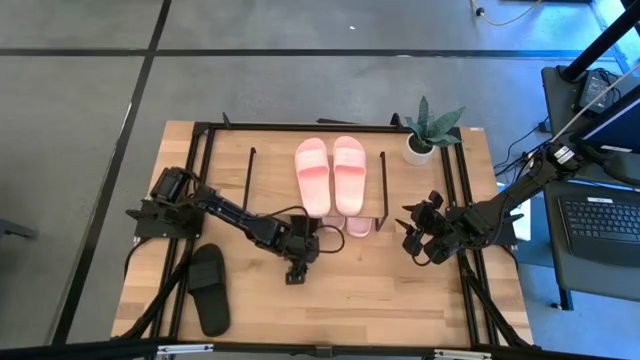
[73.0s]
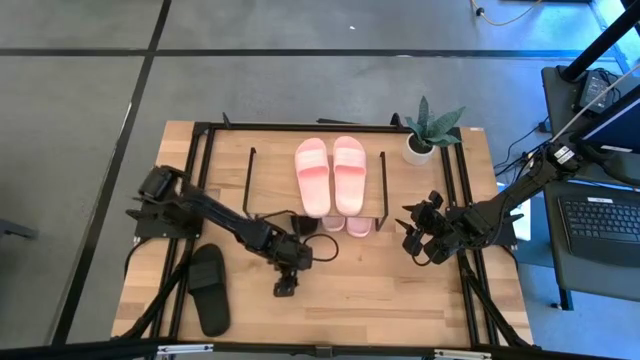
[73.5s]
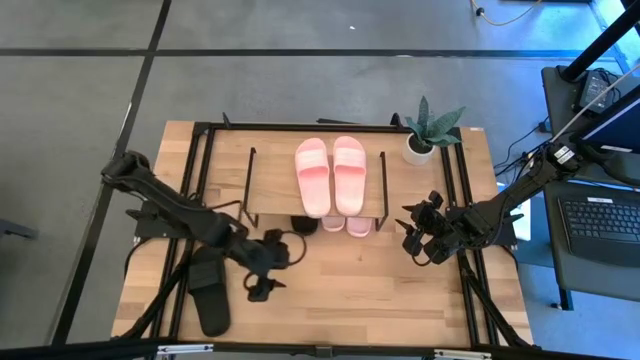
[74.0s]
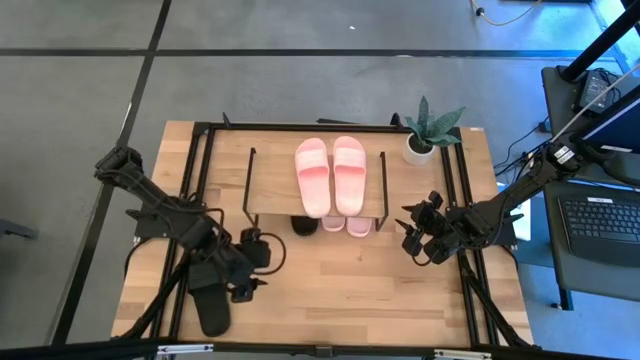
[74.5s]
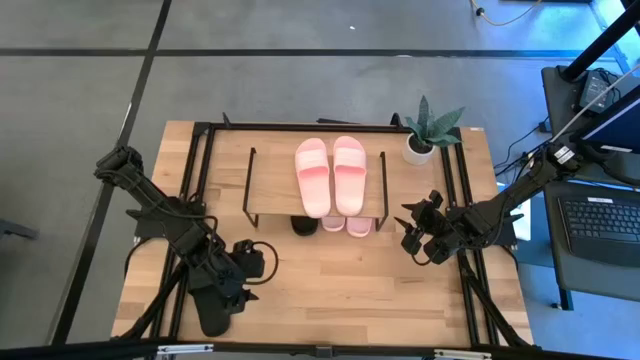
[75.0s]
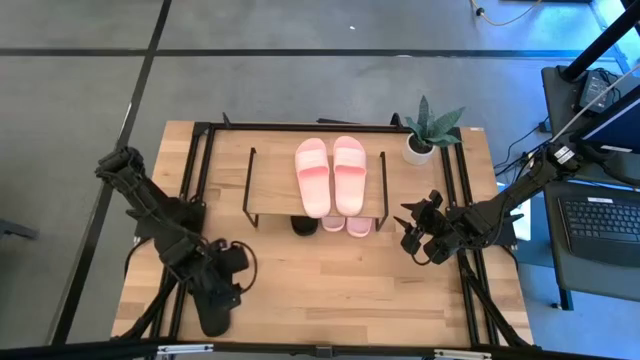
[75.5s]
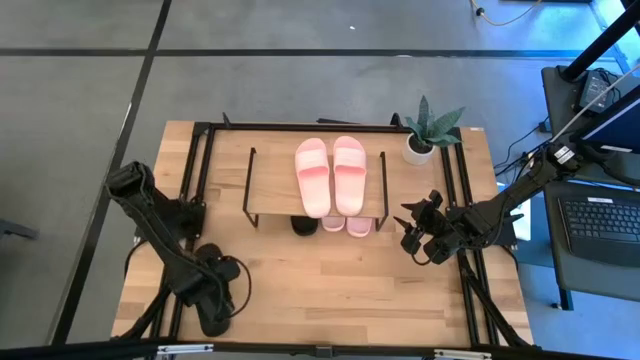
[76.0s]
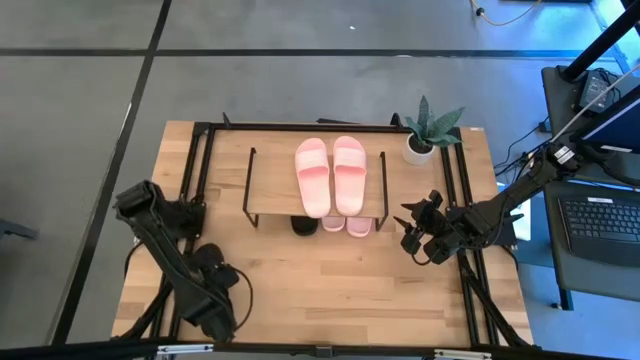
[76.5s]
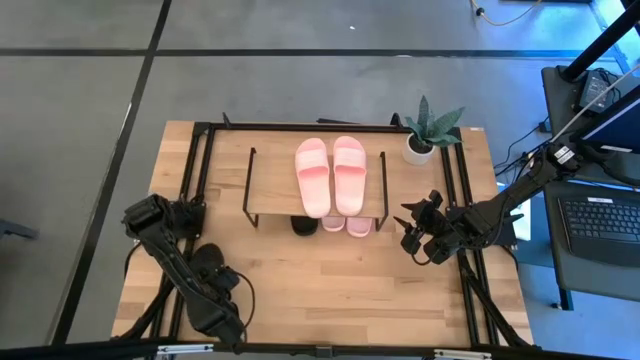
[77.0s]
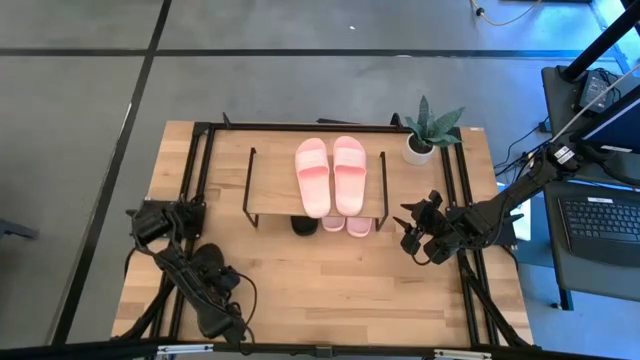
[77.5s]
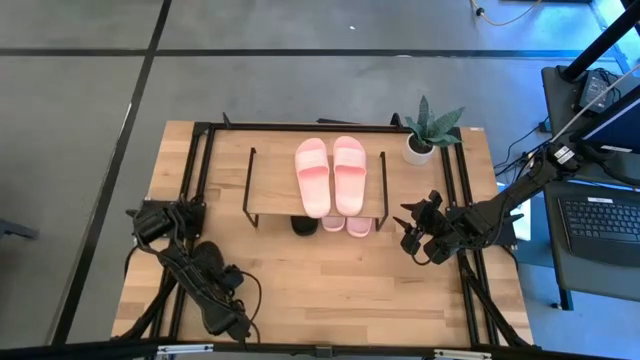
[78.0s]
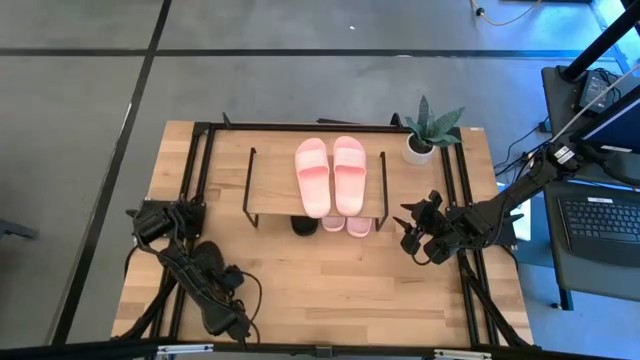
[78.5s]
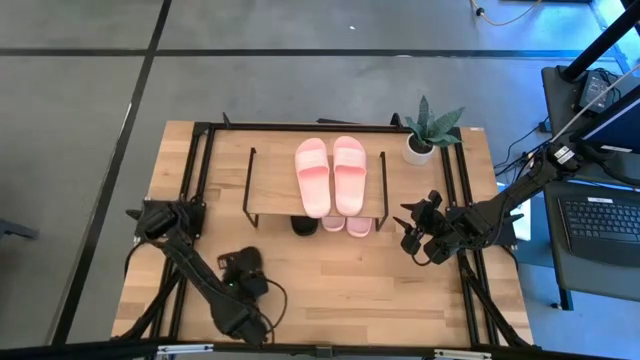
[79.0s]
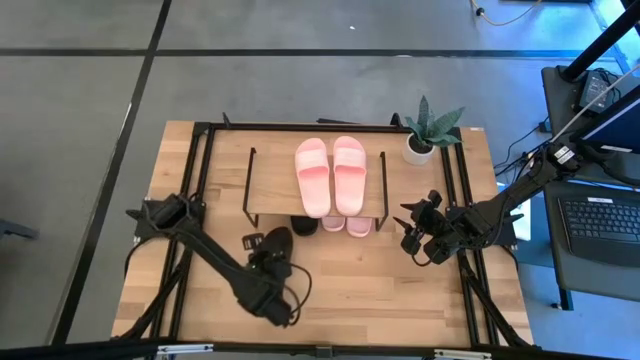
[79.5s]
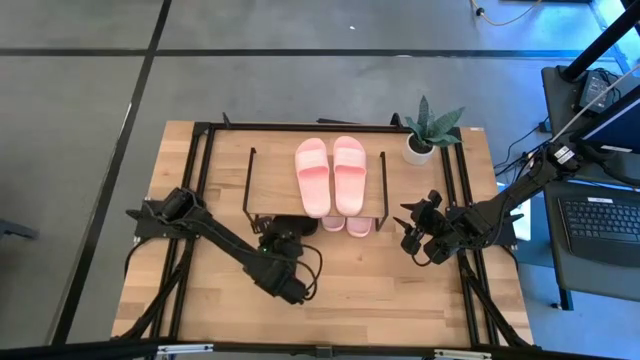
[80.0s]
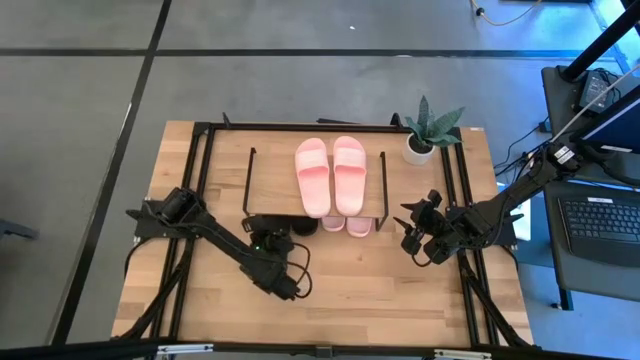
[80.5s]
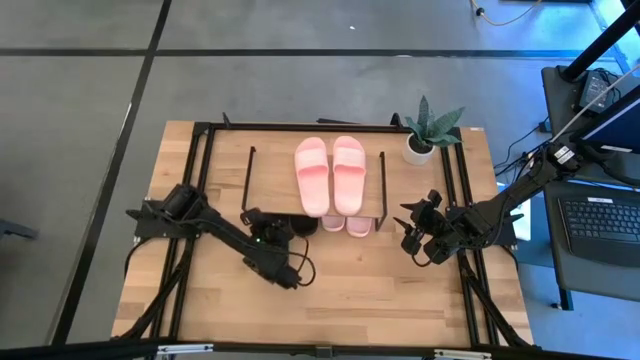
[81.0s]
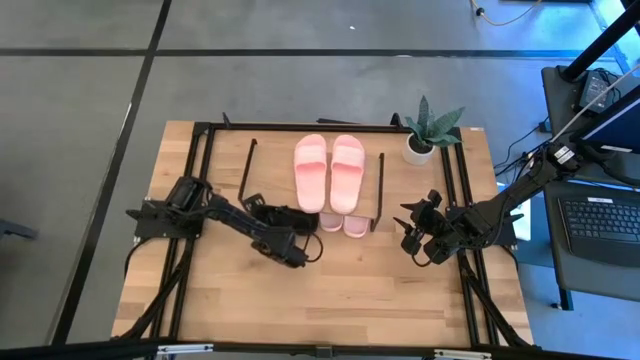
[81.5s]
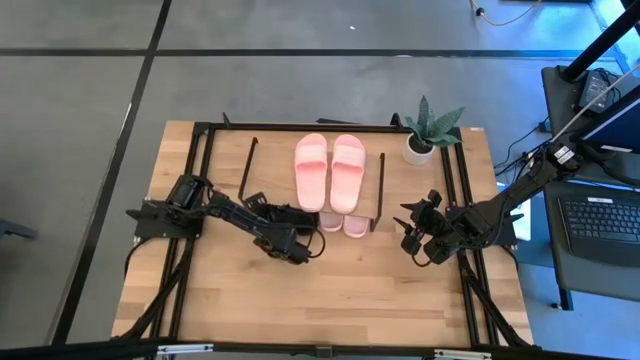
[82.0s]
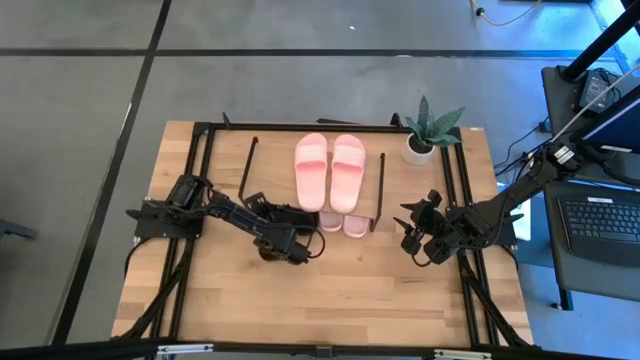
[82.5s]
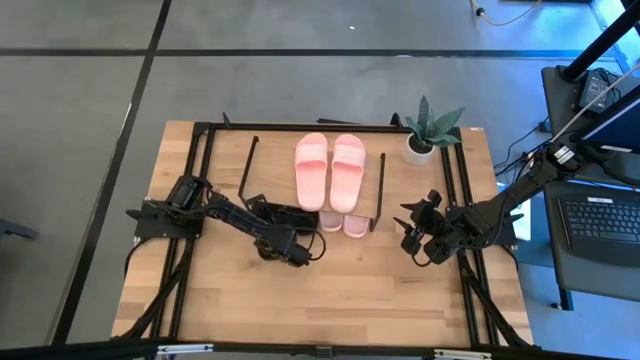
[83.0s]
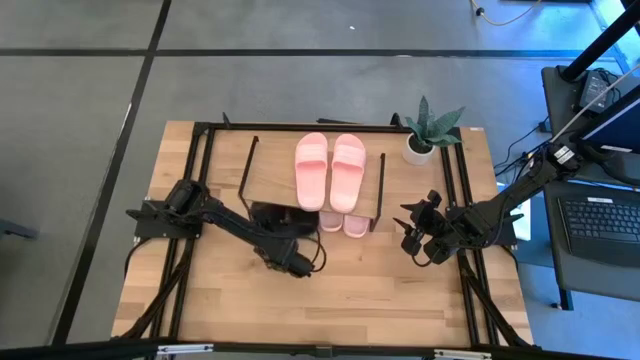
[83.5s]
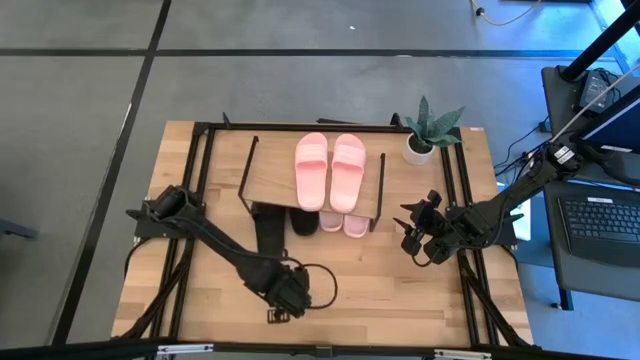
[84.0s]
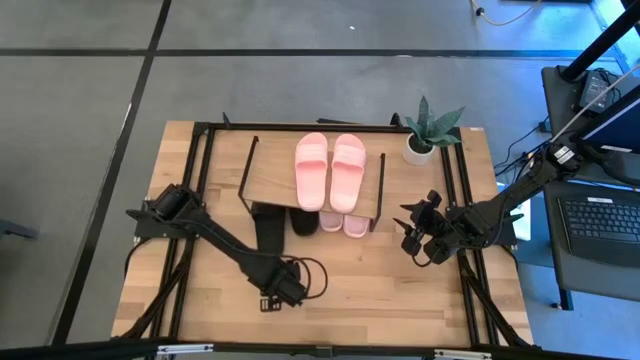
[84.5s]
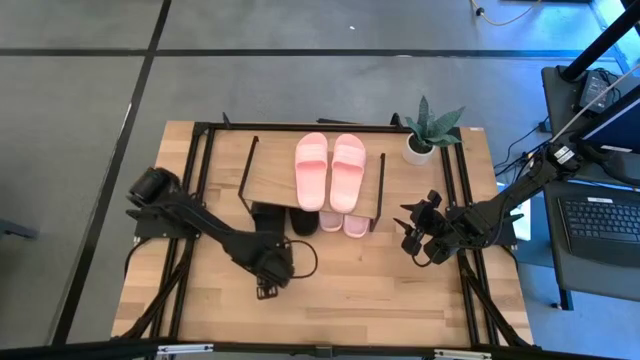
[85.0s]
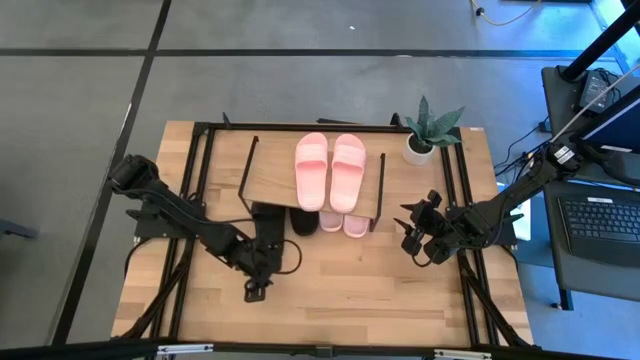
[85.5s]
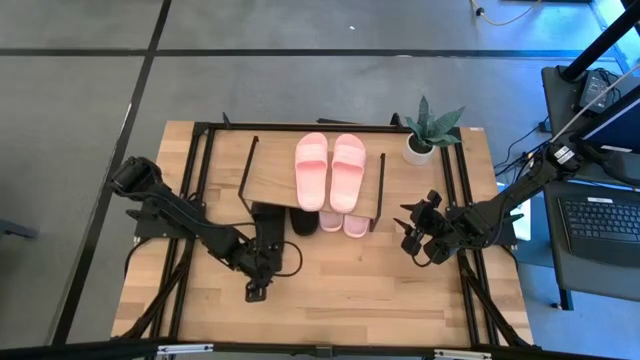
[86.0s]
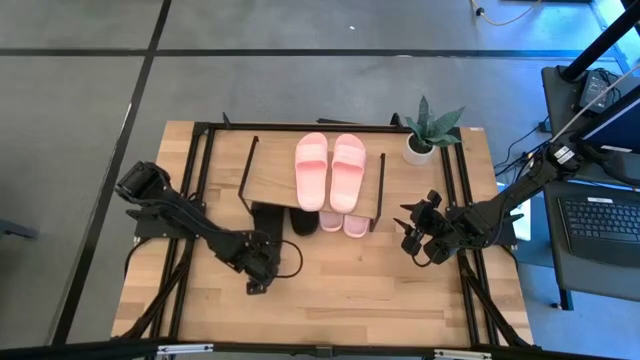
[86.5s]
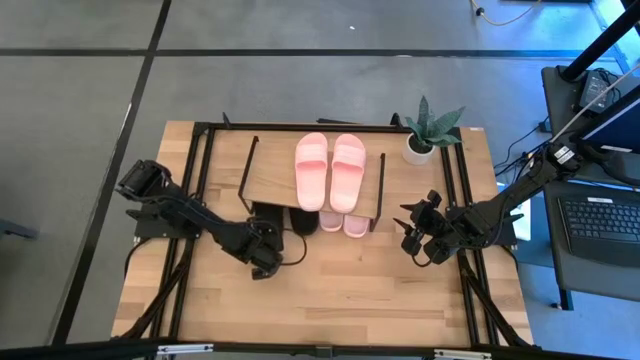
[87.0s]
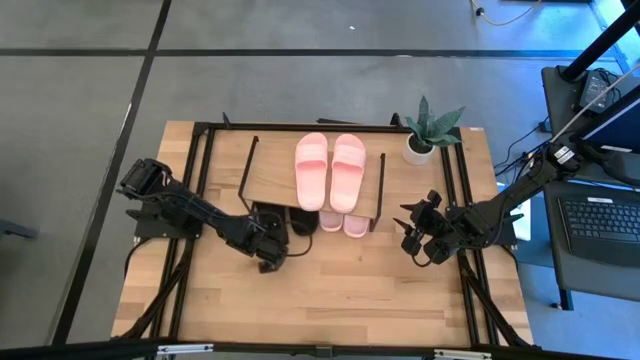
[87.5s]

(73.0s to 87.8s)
Task: Pick and place slides into the shelf
Move the black slipper under the shelf
